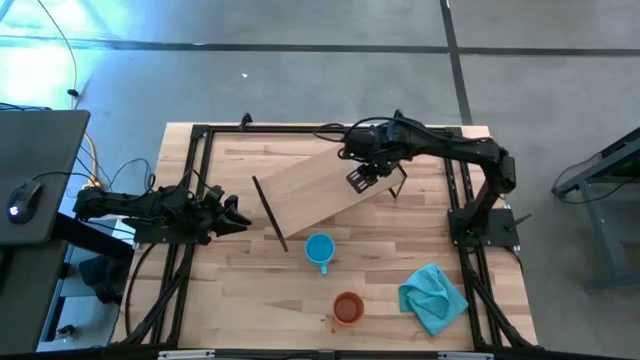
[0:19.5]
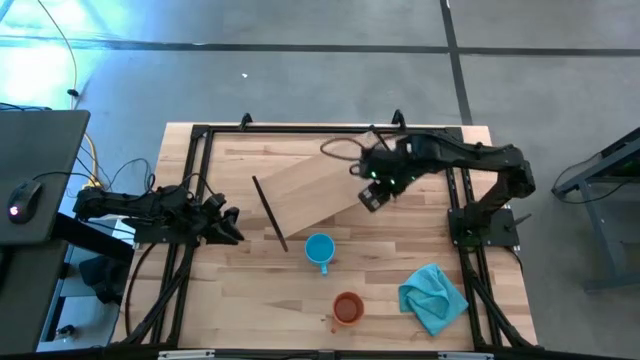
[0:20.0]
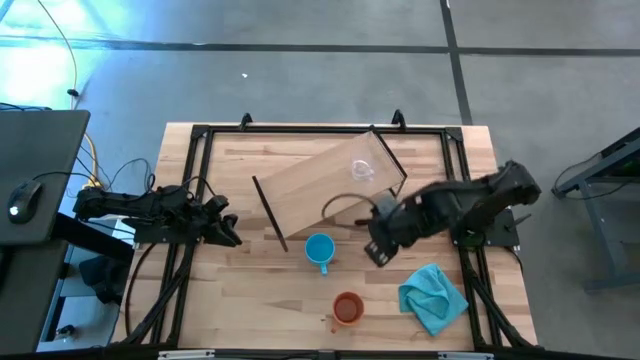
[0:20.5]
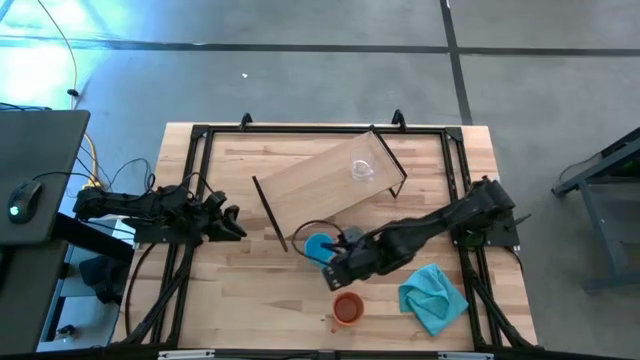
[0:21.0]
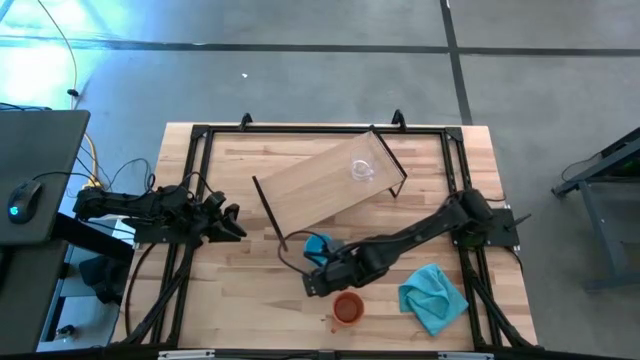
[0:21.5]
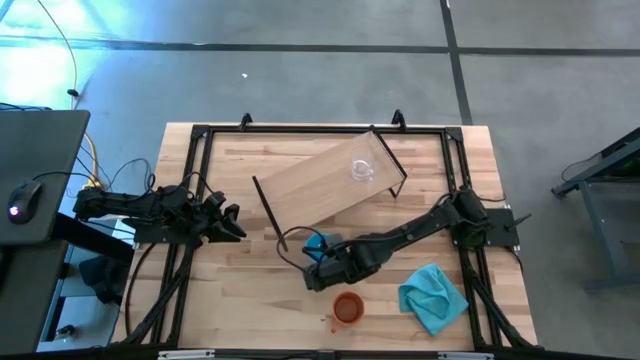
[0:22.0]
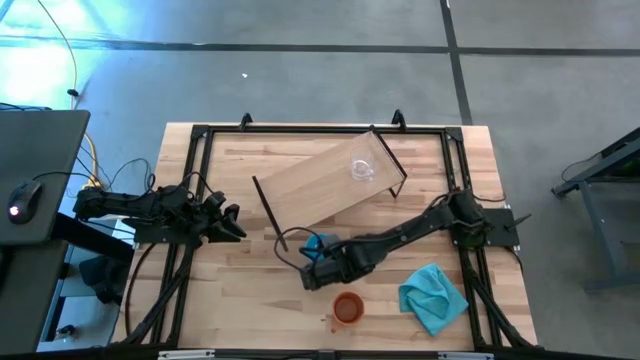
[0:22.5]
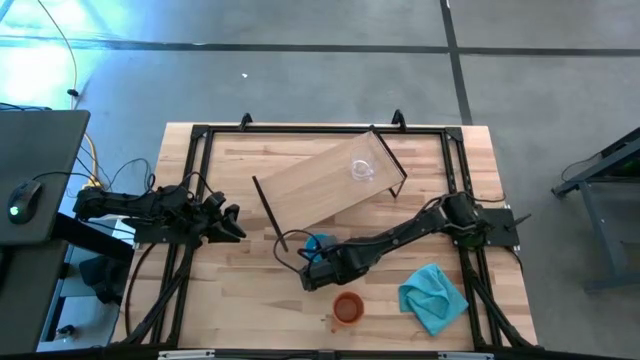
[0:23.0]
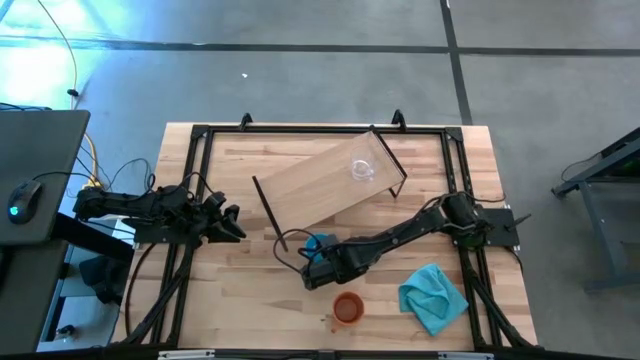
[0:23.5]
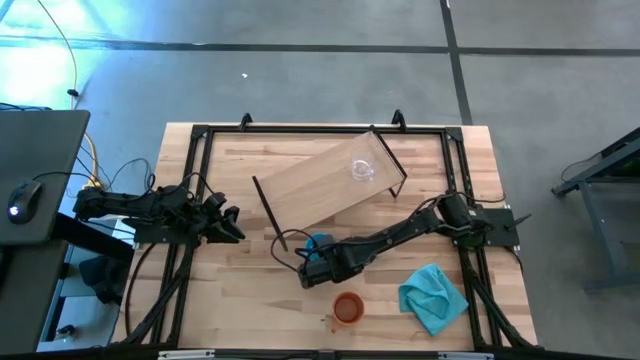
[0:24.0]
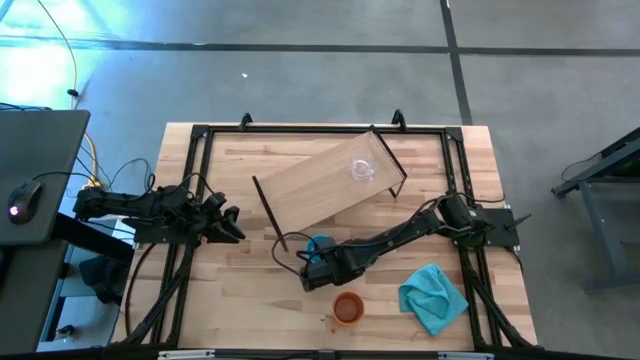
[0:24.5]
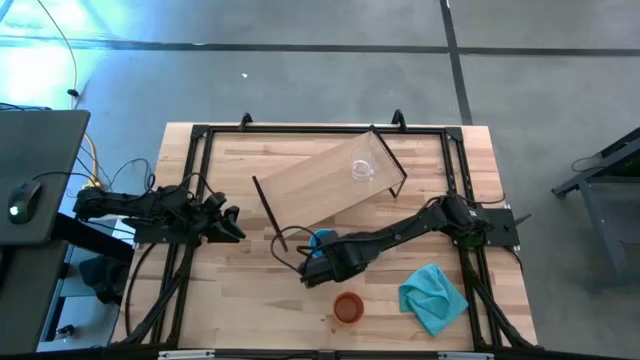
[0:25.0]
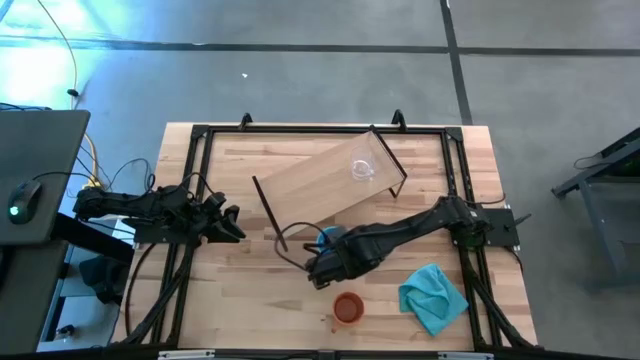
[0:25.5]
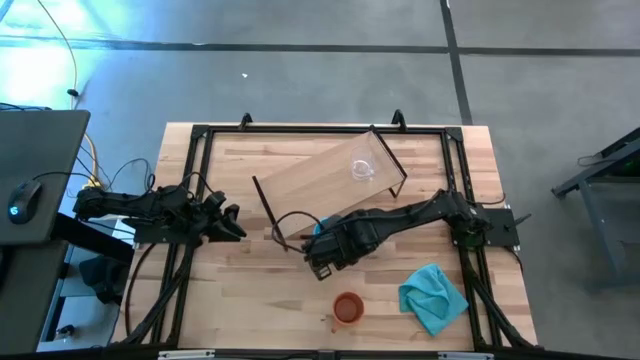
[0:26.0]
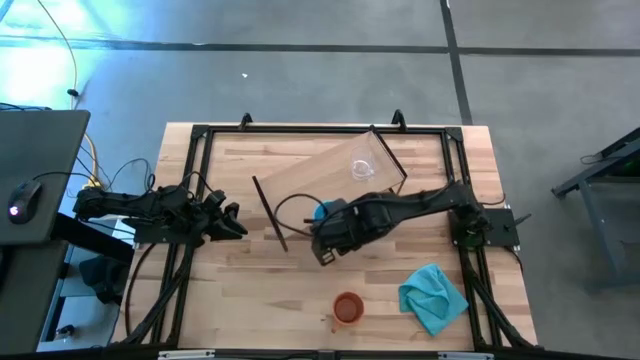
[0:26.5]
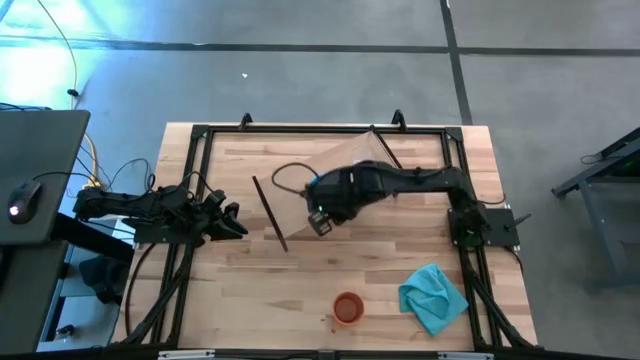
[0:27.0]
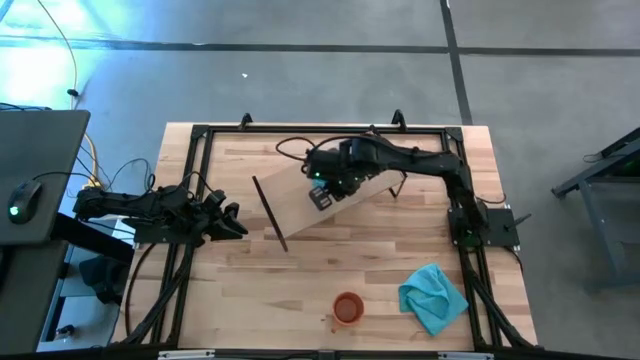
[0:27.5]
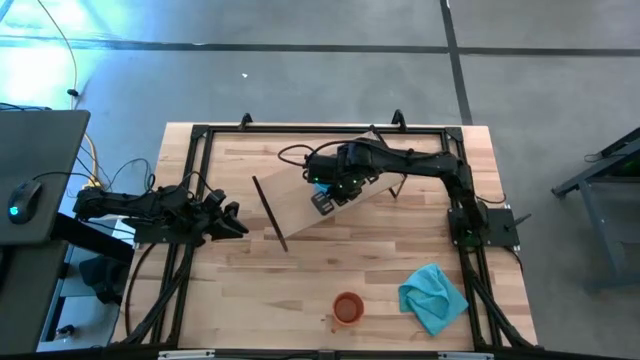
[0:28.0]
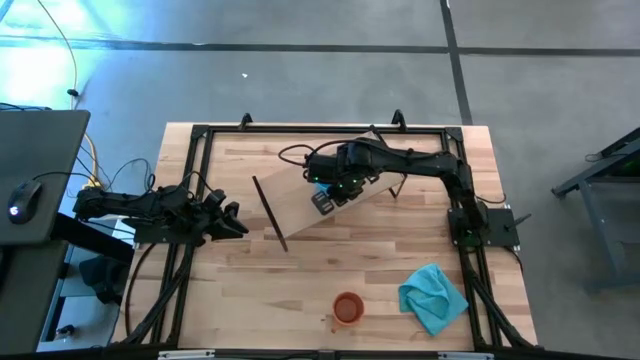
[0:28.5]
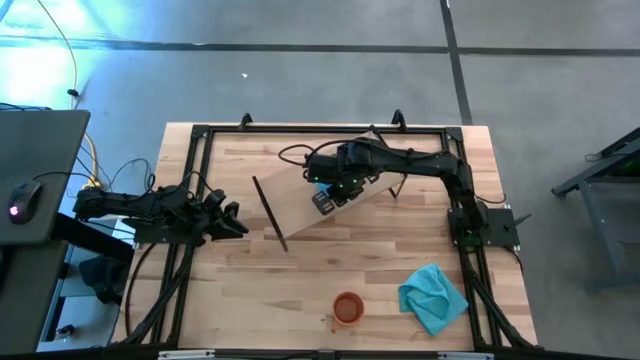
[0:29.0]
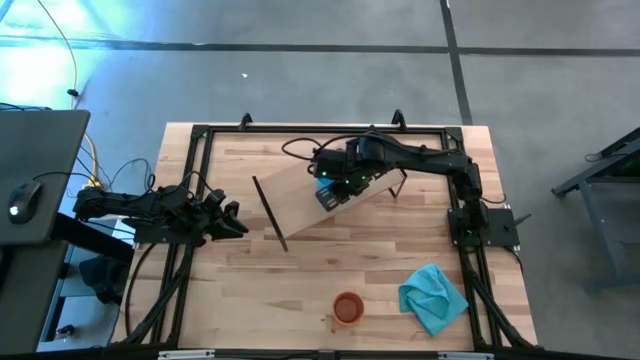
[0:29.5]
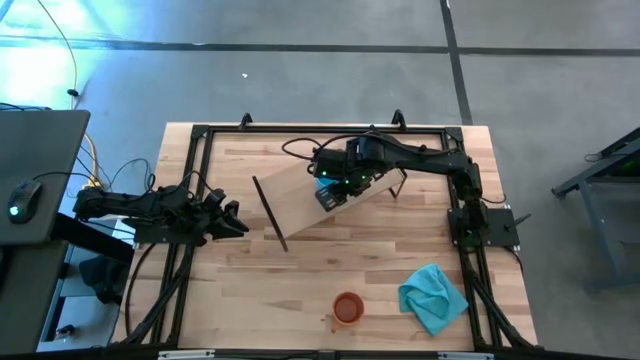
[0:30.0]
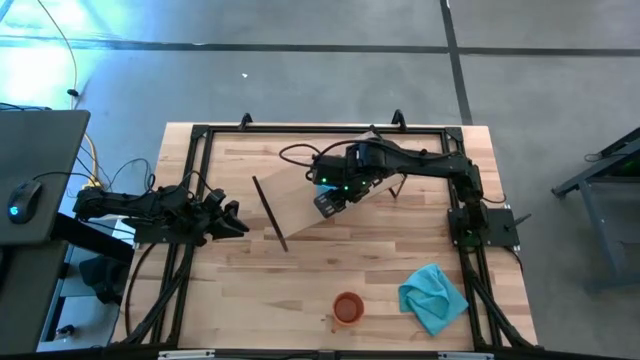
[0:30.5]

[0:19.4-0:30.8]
Task: Stack small to large cups/mugs on shelf
Put the blue mug on the shelf

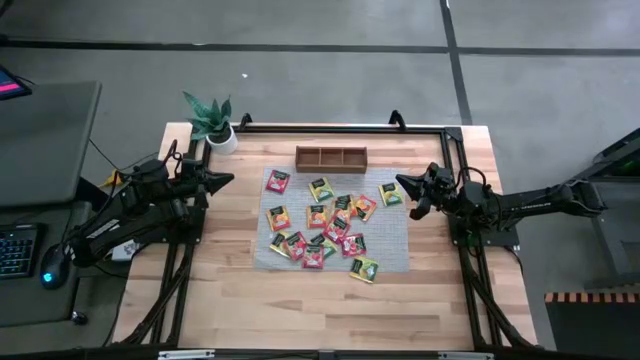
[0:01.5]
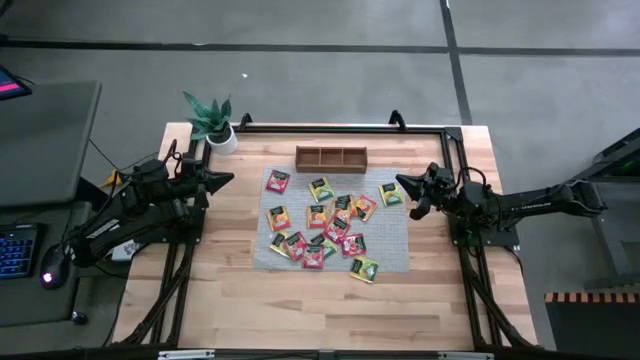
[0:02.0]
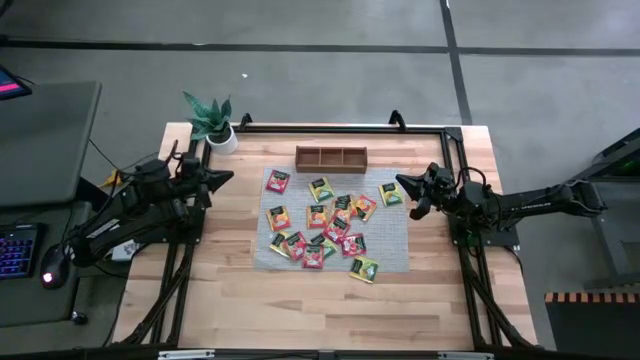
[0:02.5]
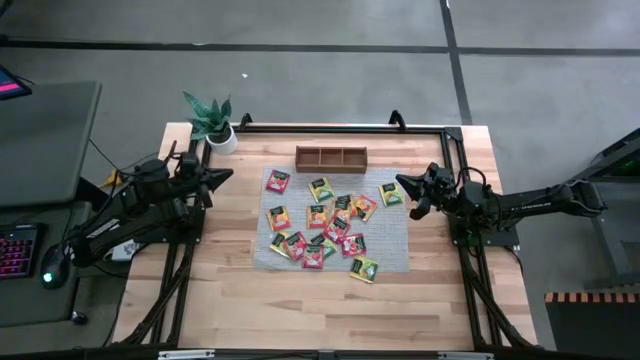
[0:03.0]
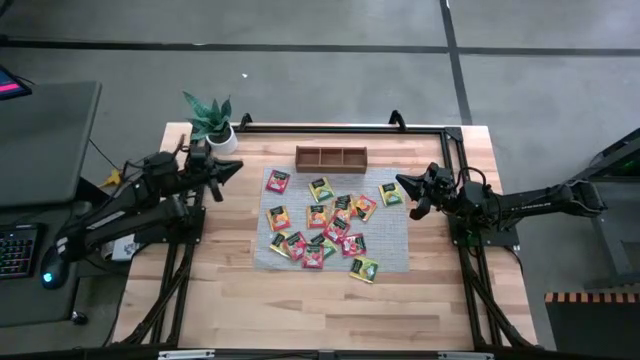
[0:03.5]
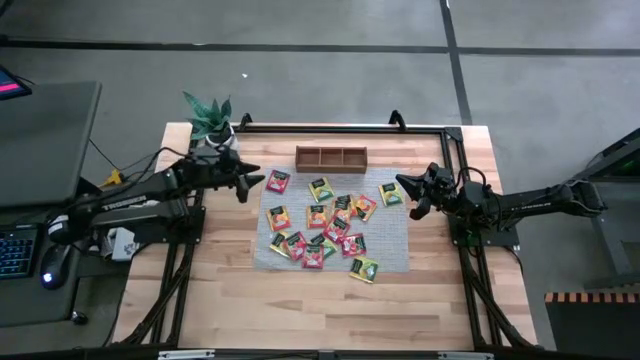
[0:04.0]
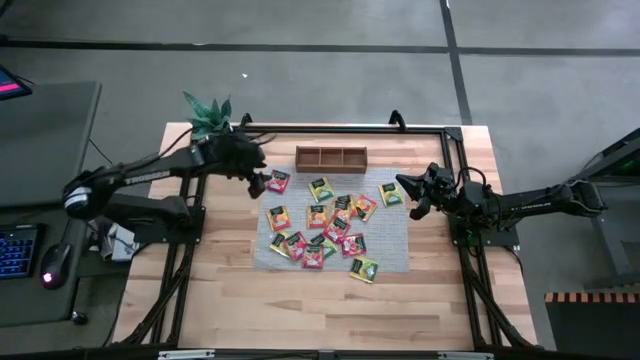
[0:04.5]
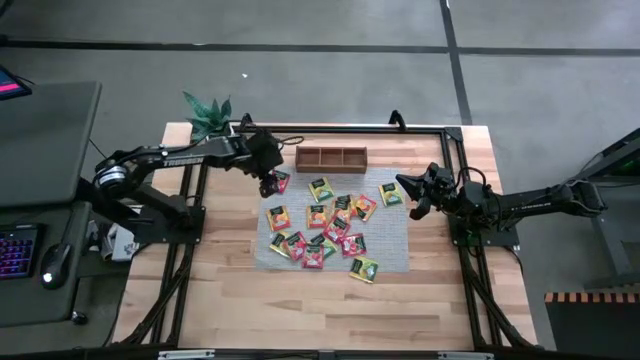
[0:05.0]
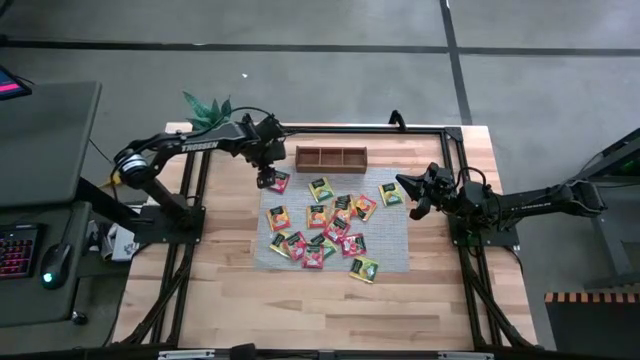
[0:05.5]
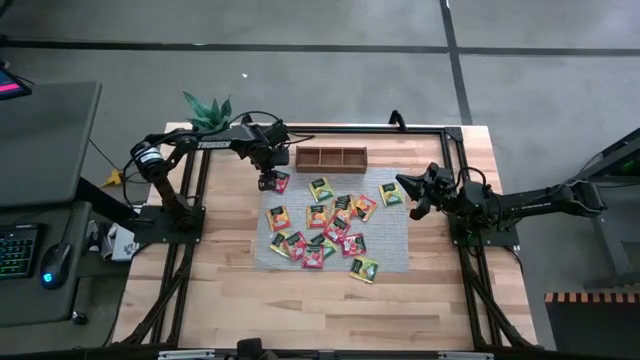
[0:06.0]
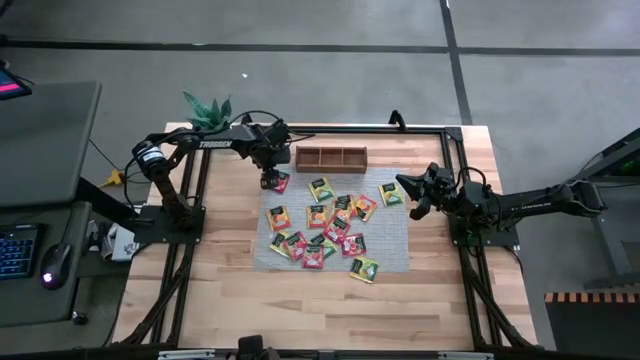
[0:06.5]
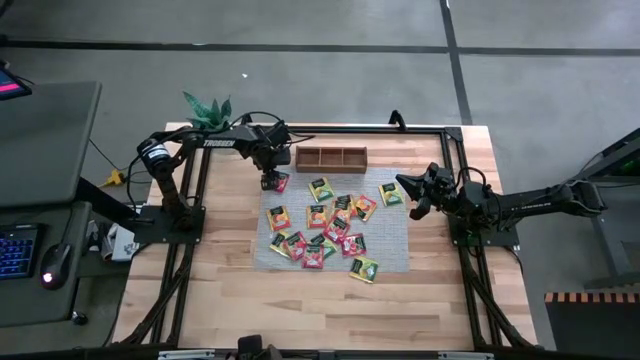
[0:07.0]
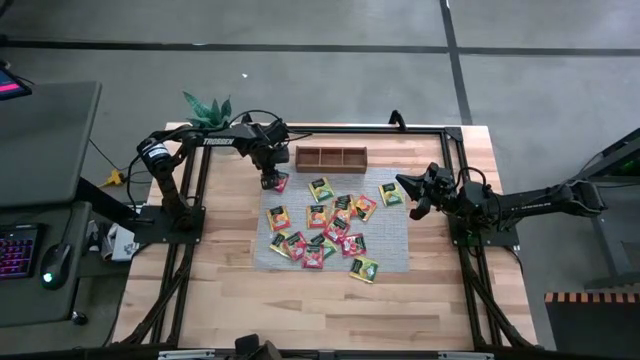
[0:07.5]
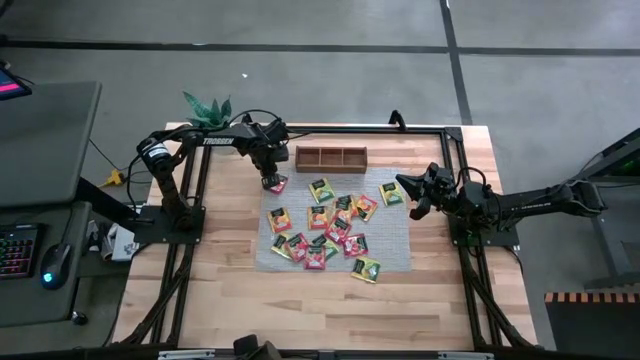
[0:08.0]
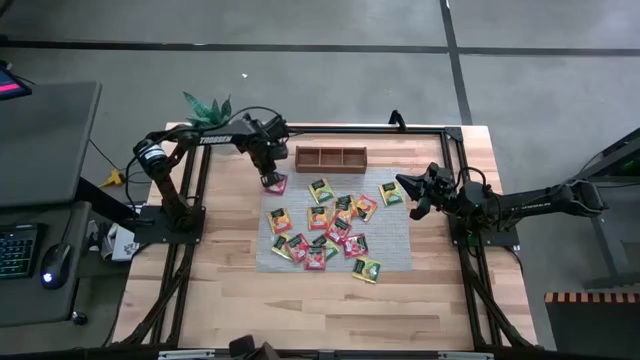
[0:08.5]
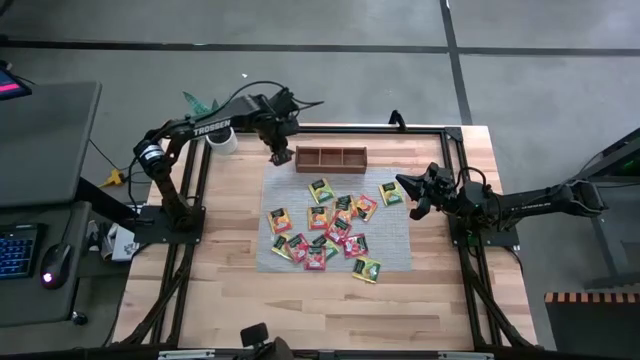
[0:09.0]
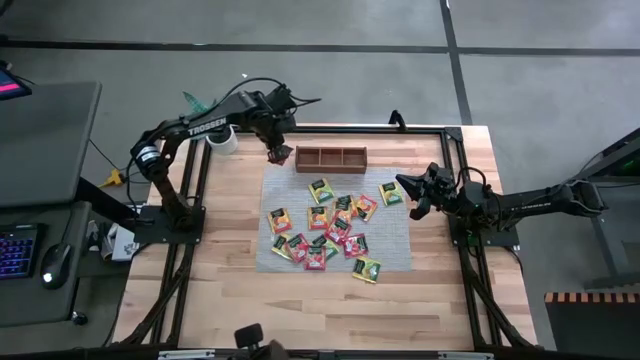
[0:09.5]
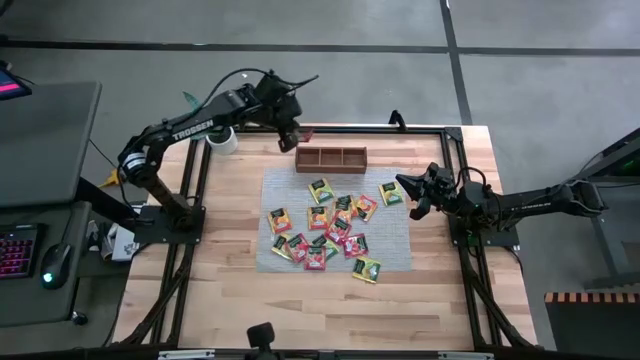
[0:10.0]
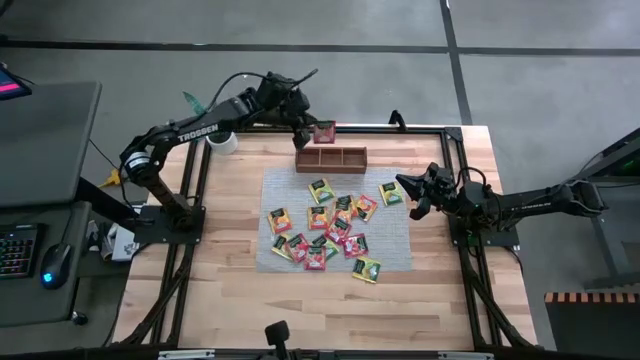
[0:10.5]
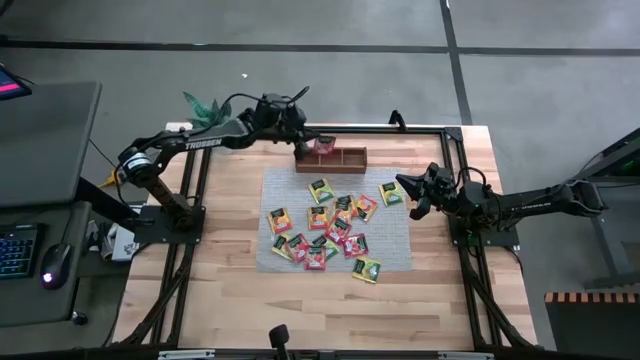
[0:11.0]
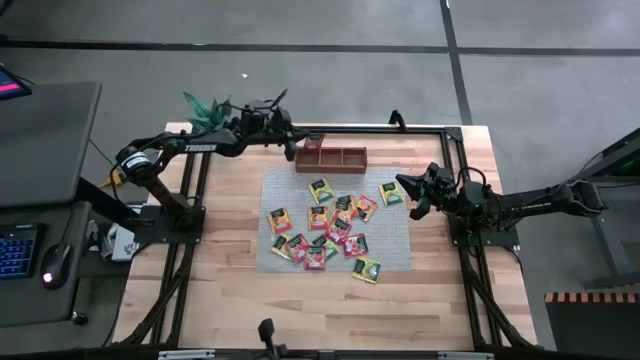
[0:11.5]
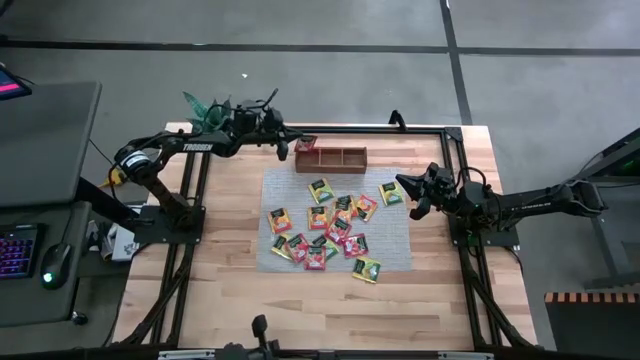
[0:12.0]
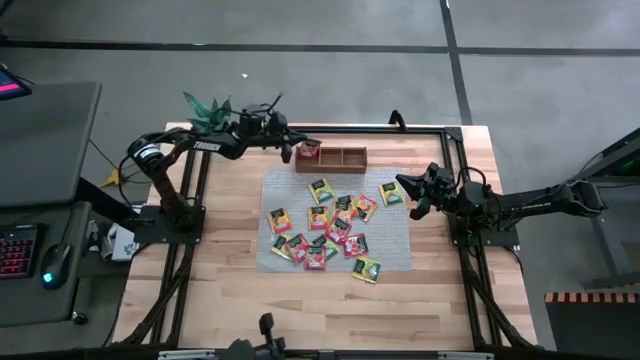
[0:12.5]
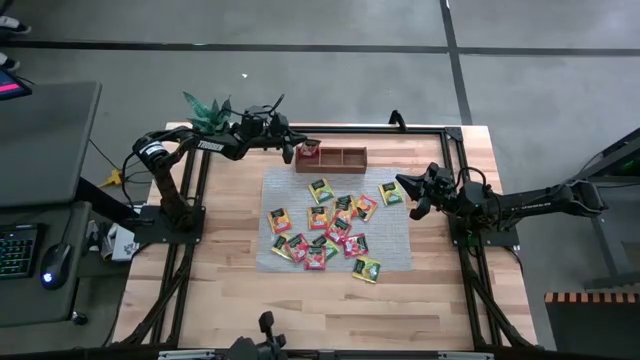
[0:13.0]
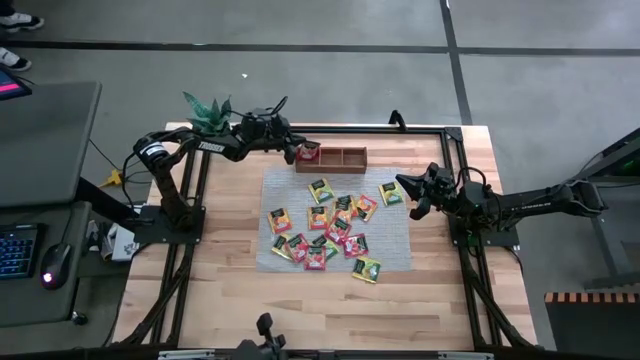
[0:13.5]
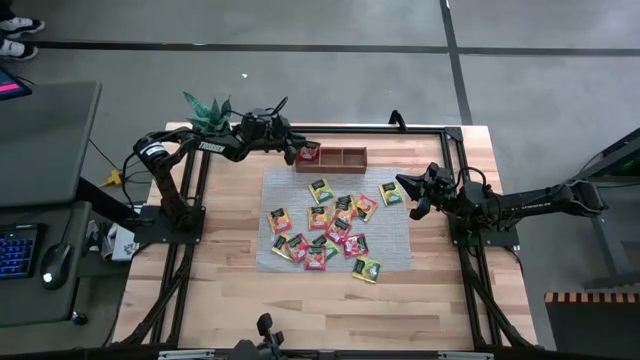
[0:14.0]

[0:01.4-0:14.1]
Task: Pick & Place Tea
Put the red tea bag into the left section of the wooden organizer
